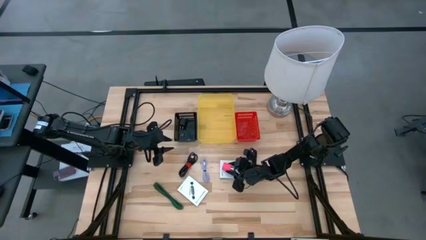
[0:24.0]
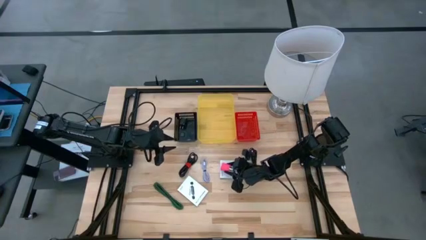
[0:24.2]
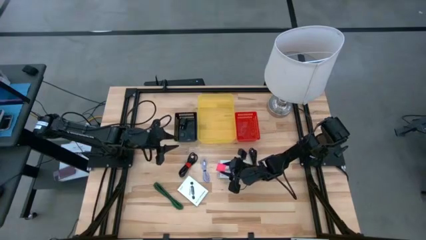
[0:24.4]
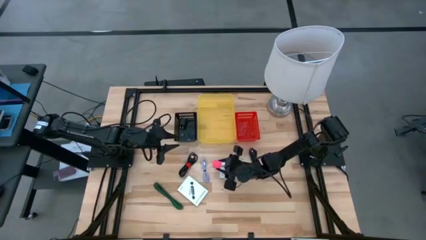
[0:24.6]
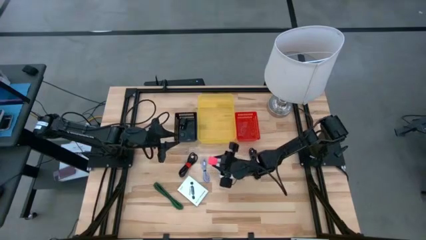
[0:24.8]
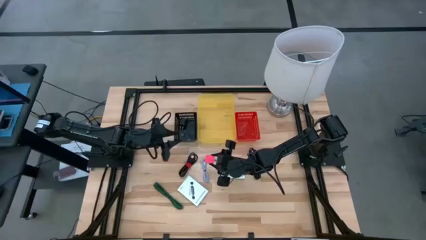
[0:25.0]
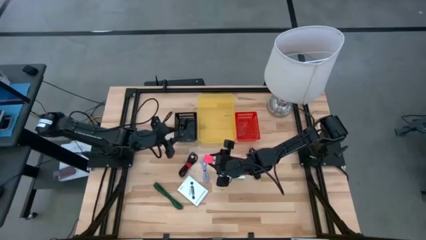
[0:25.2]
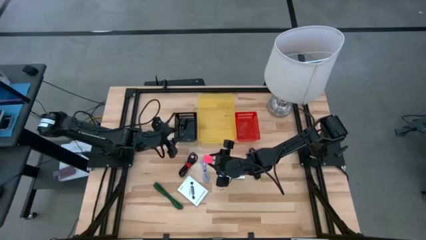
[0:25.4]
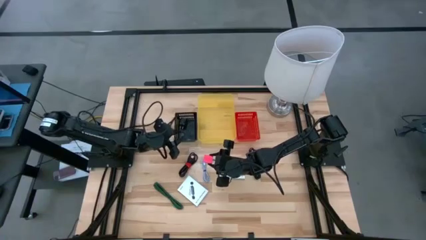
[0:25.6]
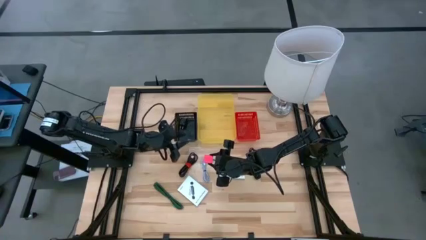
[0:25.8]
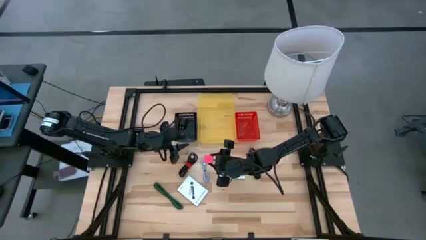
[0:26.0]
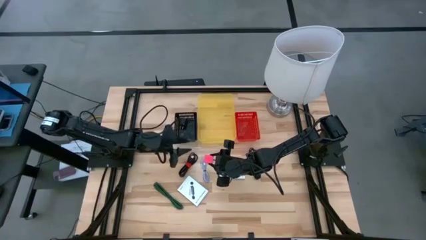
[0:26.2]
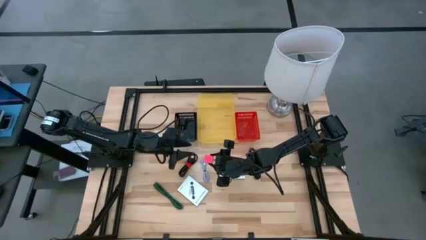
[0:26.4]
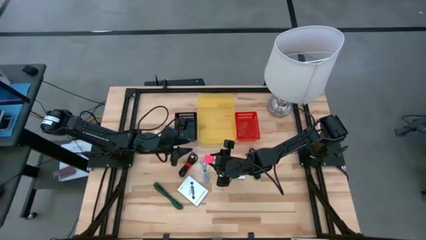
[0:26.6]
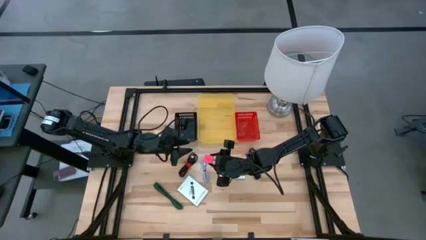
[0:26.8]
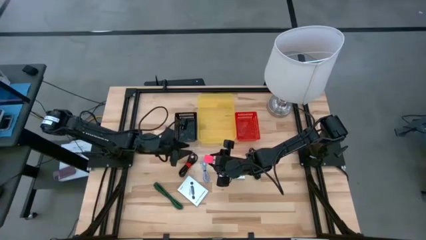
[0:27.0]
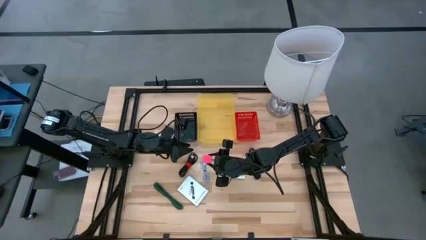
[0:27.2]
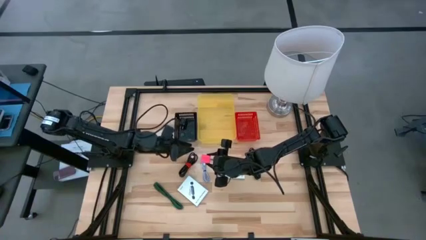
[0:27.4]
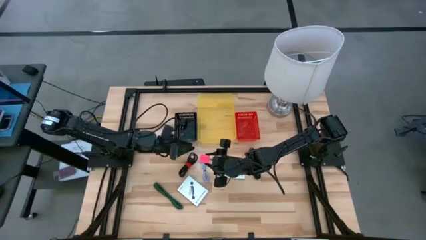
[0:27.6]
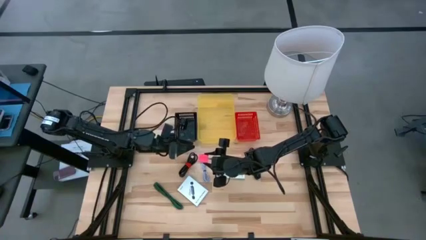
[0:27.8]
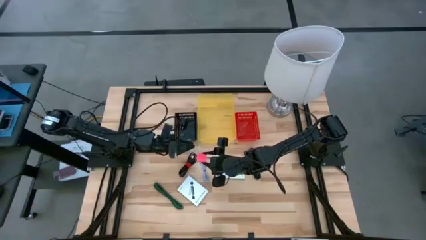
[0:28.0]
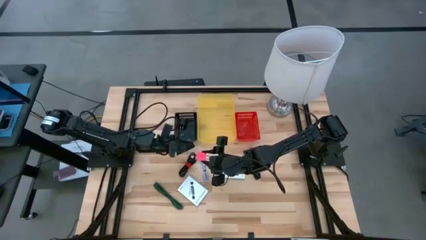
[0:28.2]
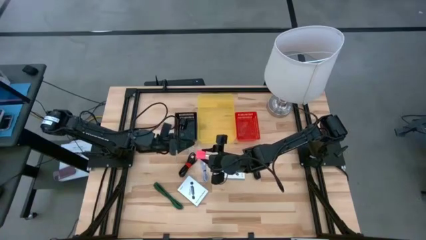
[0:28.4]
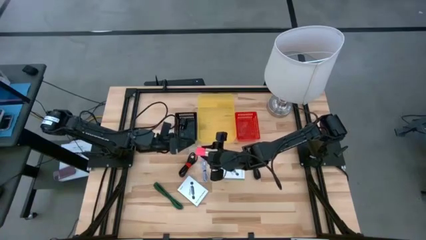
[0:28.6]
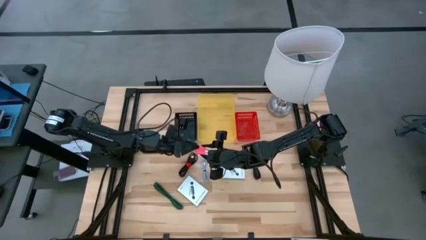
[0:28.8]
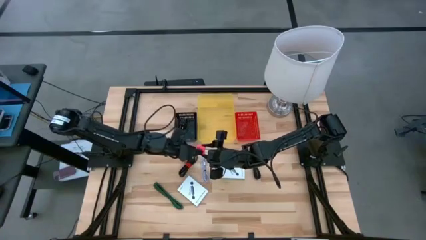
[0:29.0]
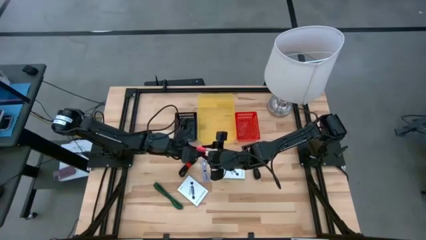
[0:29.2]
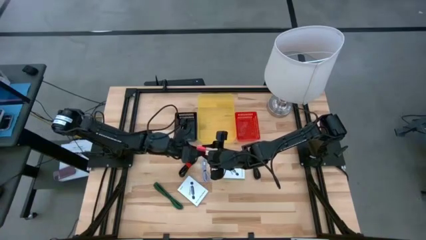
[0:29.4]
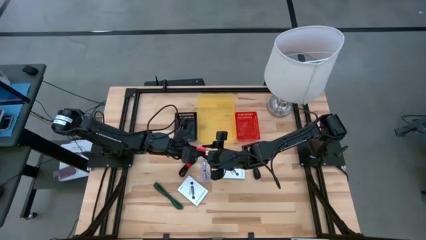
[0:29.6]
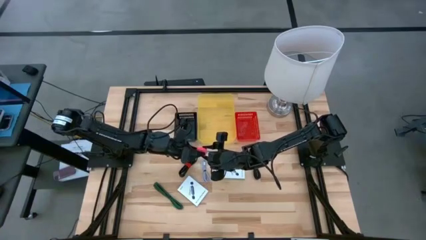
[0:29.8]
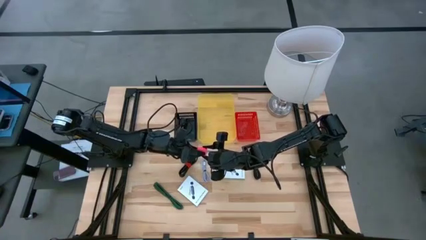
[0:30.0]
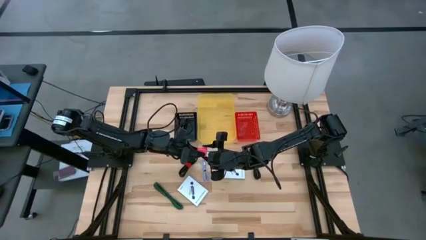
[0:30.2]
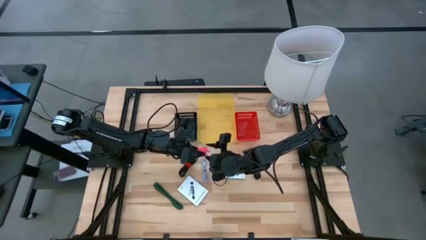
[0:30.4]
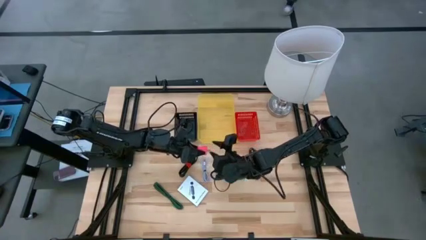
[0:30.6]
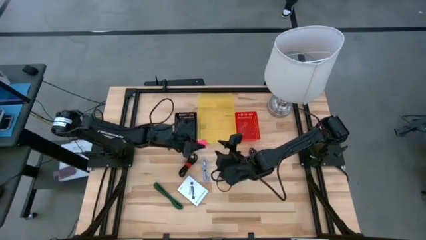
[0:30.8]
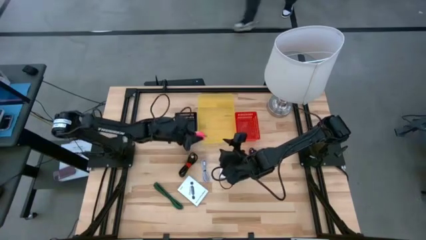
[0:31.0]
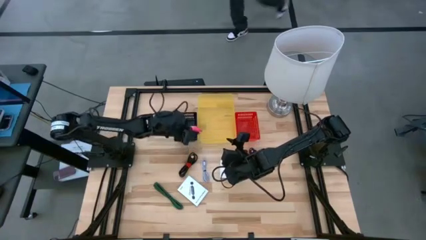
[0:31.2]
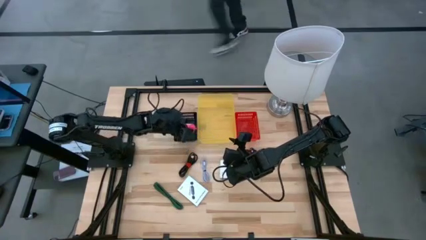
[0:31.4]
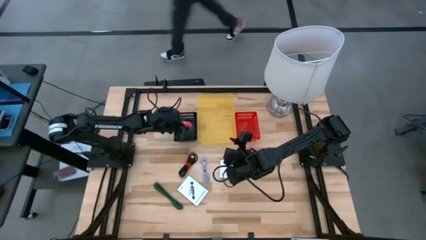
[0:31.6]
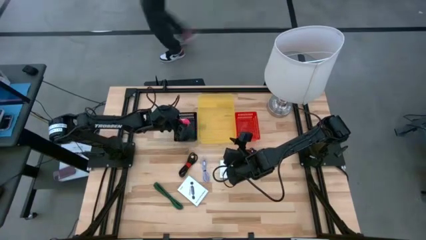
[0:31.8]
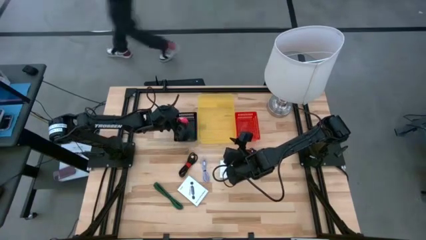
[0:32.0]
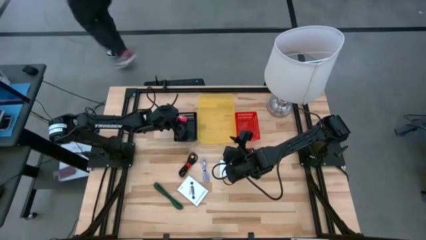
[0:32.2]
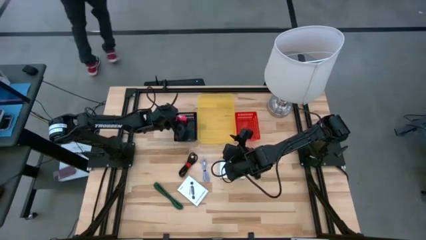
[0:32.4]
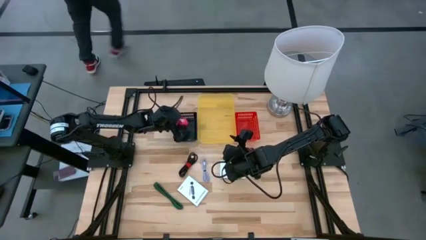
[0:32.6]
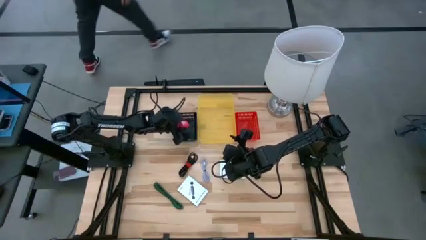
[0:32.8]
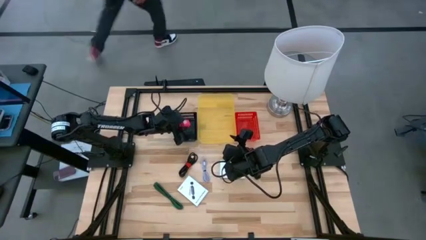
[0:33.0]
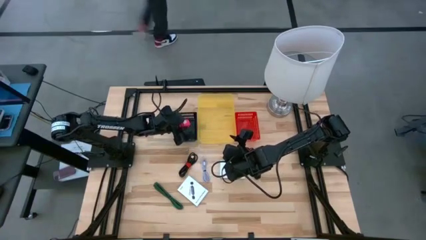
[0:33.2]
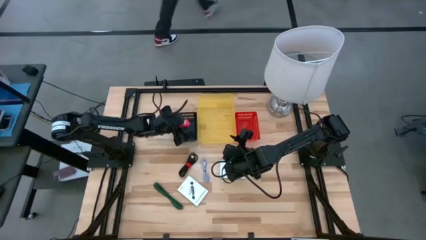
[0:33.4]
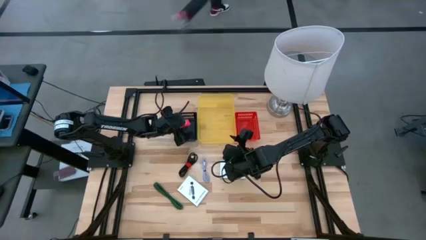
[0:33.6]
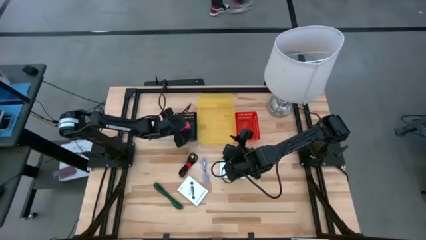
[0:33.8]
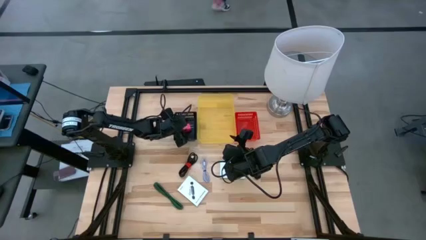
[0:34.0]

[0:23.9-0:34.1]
Task: Pick and place items into bin
Put the pink charger adapter into the black bin

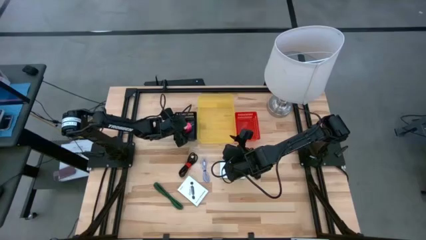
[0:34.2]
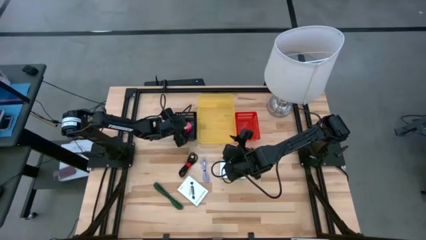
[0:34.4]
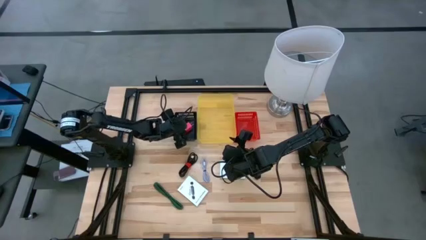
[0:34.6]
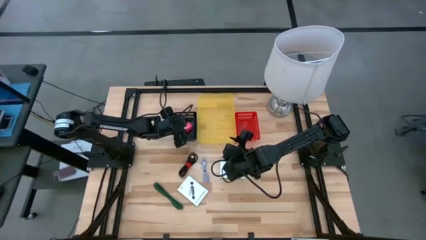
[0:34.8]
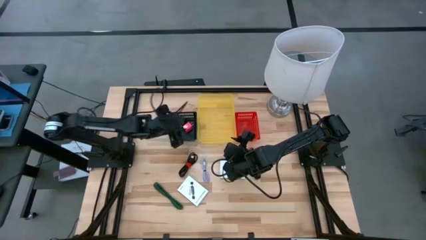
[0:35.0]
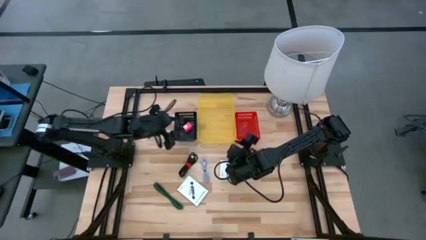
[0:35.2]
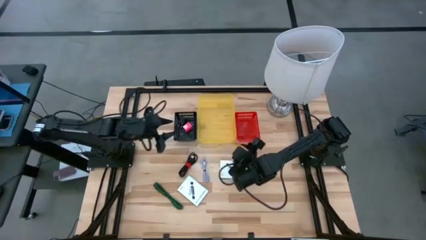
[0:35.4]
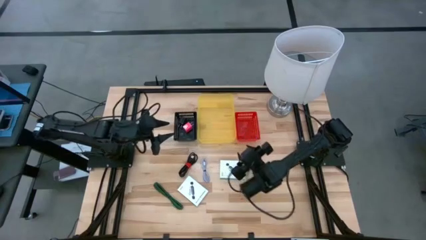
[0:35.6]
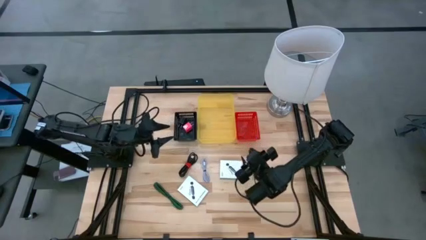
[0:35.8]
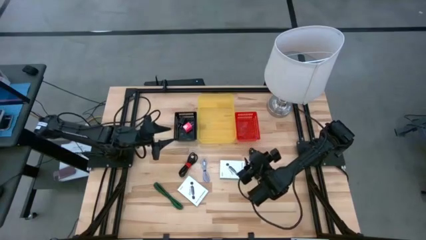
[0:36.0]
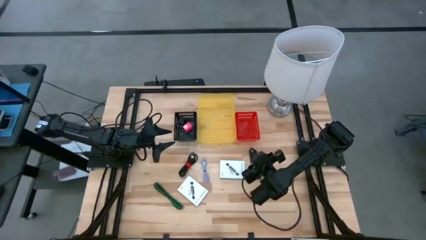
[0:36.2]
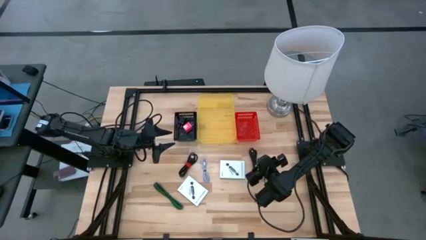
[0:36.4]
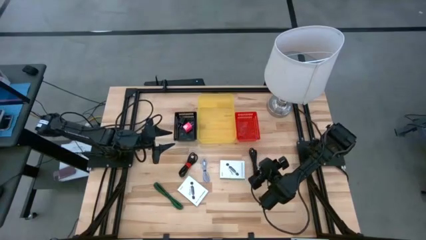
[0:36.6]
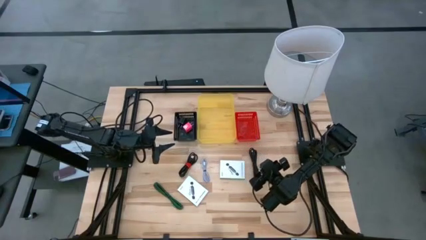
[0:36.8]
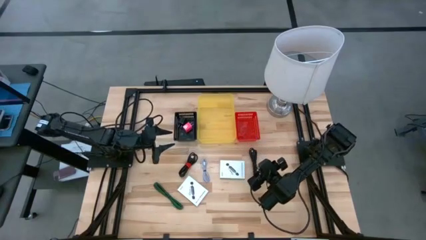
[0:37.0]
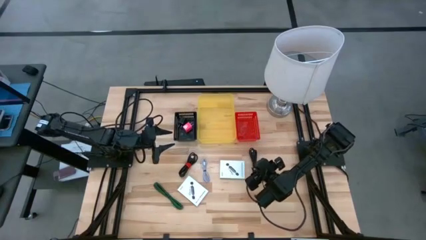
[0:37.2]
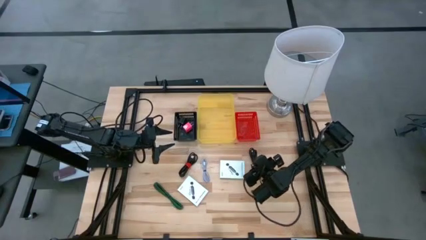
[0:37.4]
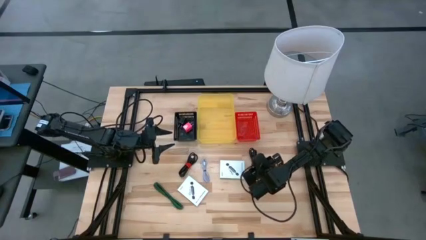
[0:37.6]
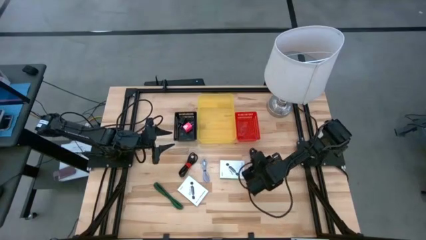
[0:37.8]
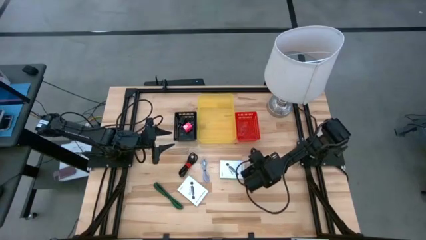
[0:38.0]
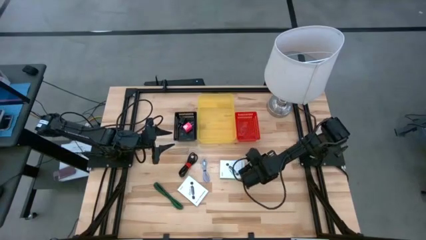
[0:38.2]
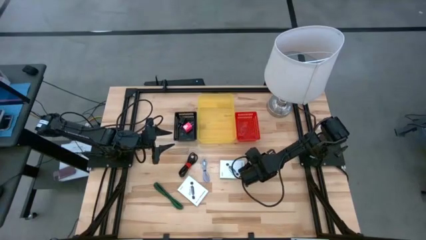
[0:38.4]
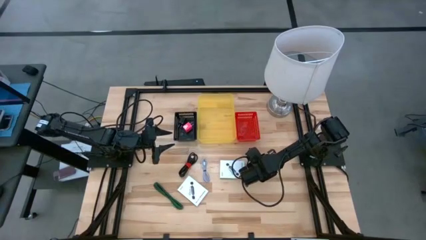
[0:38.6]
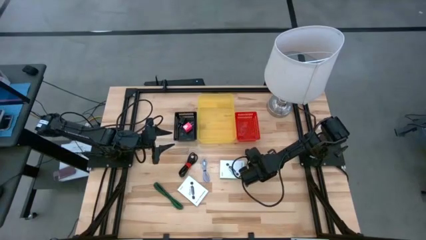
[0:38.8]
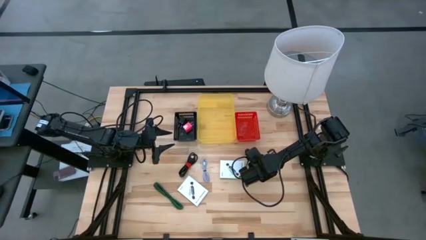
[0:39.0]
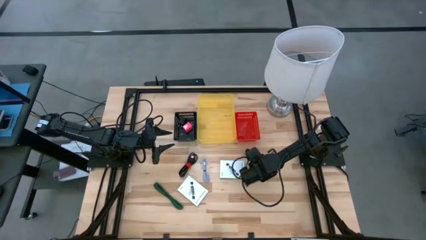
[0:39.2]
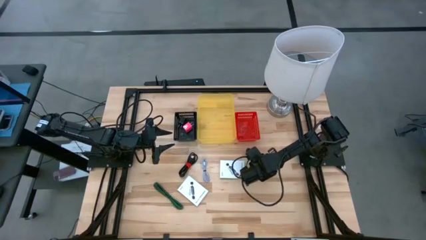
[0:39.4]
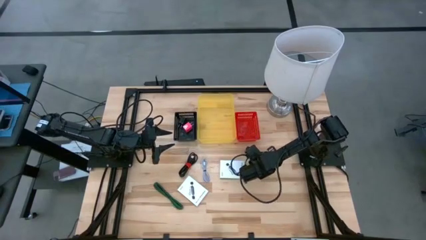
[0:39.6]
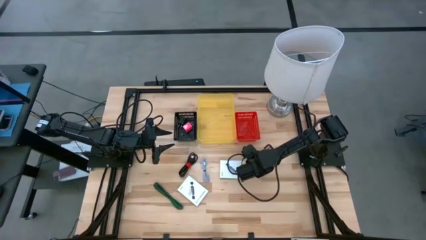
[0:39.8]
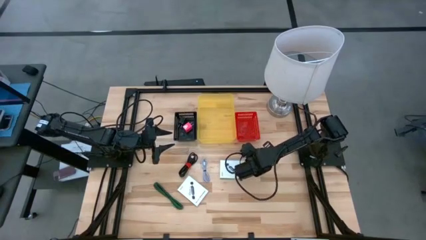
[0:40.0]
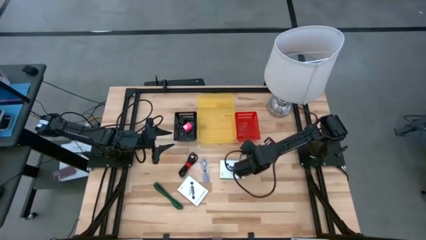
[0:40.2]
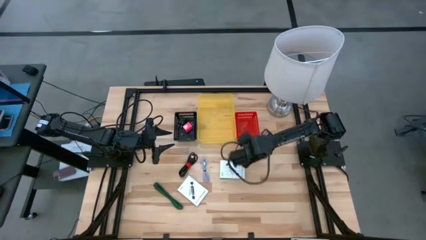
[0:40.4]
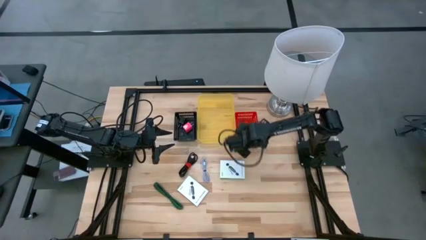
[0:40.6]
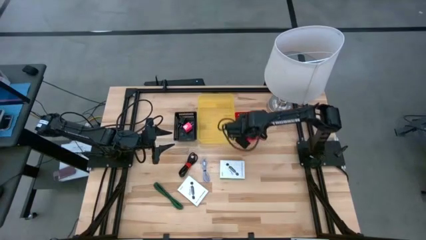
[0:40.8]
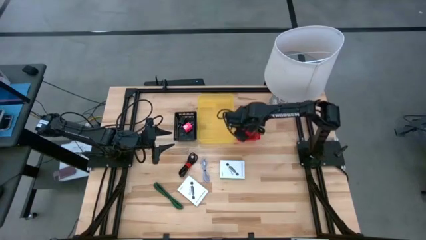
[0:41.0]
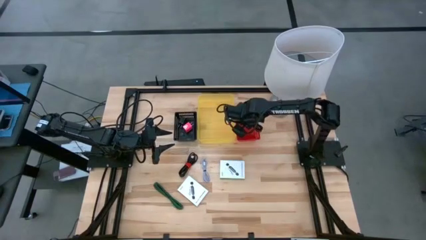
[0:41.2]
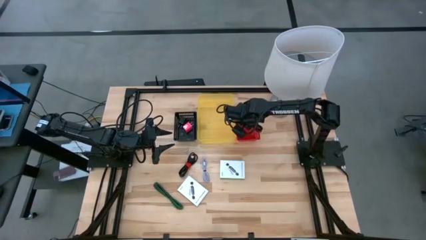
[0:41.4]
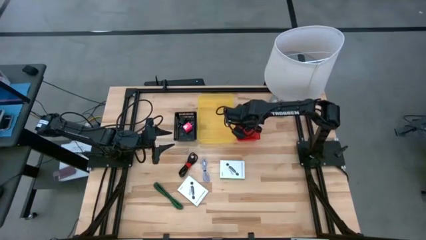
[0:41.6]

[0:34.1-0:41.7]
Put the right black charger cable into the red bin
